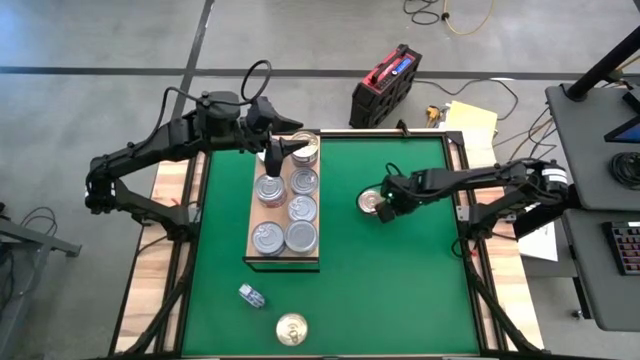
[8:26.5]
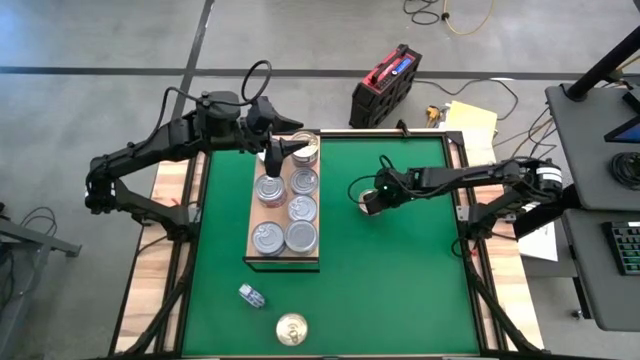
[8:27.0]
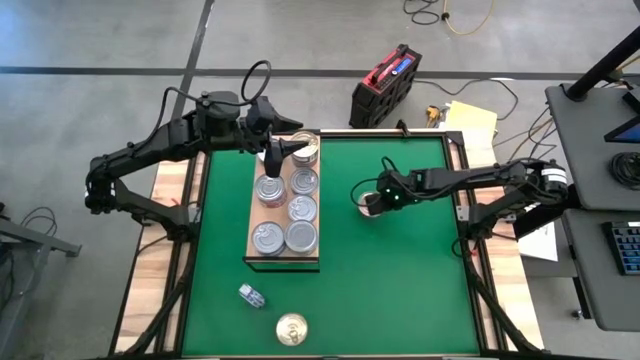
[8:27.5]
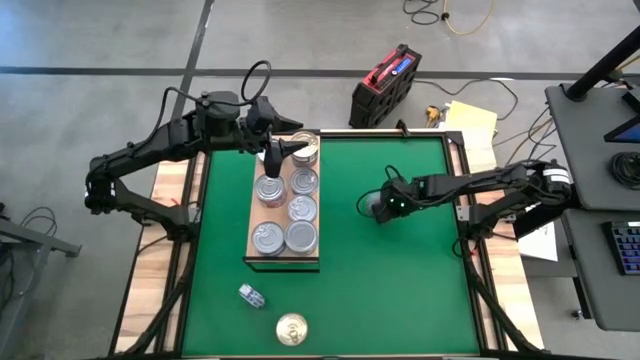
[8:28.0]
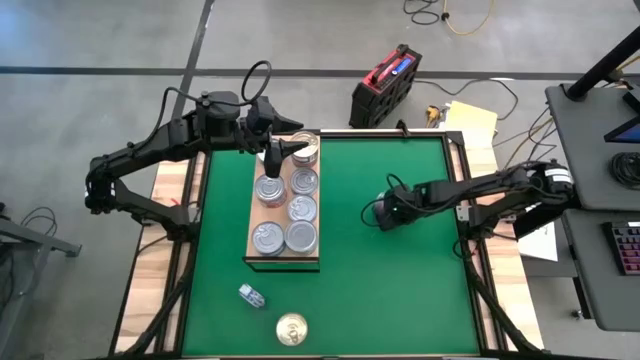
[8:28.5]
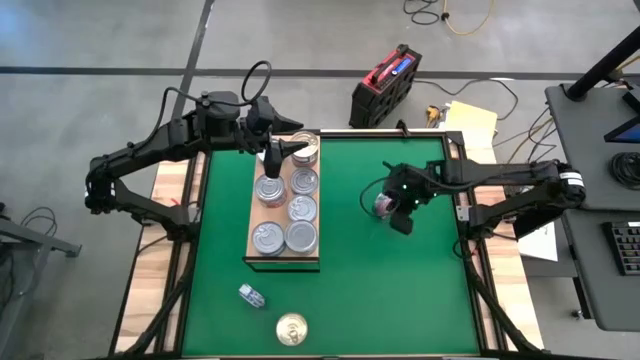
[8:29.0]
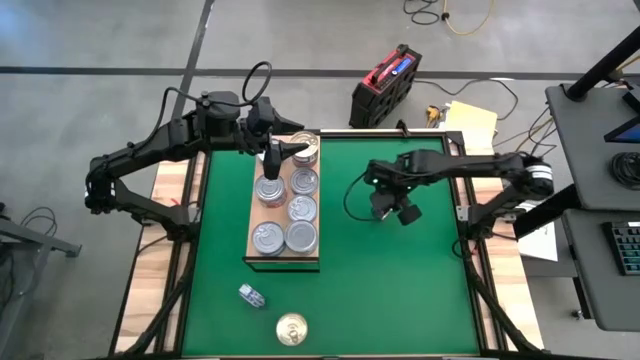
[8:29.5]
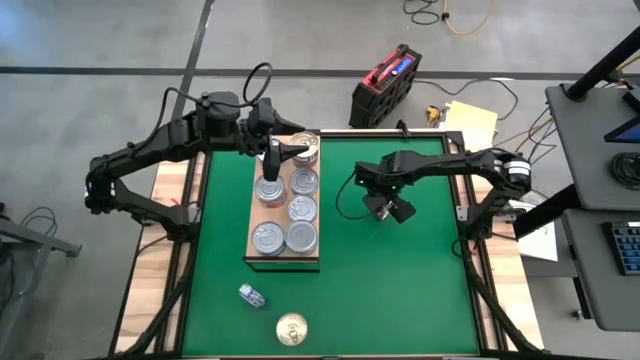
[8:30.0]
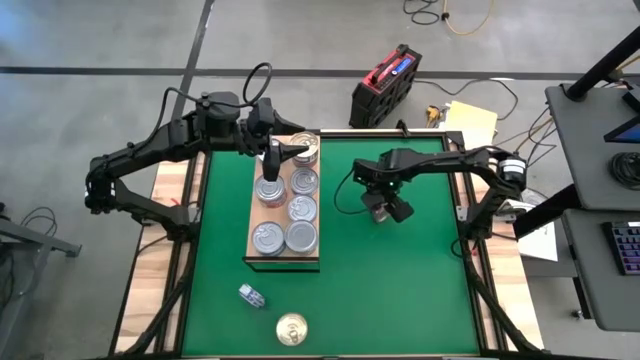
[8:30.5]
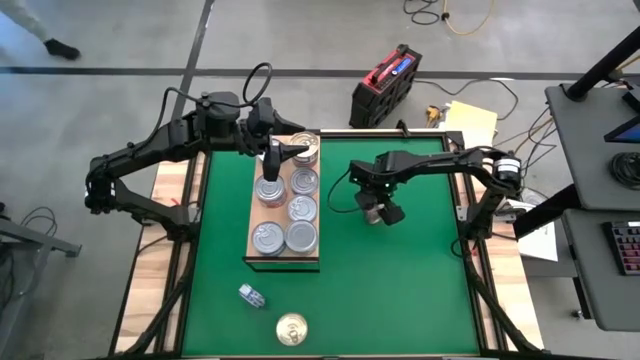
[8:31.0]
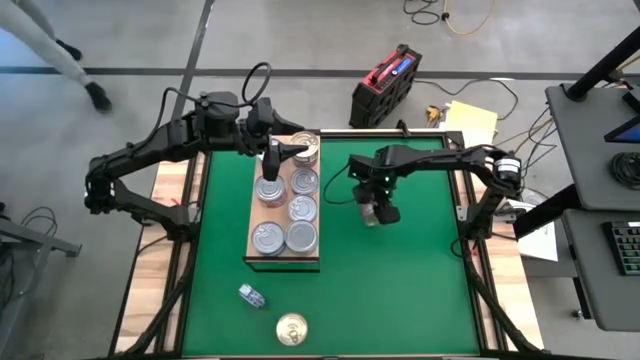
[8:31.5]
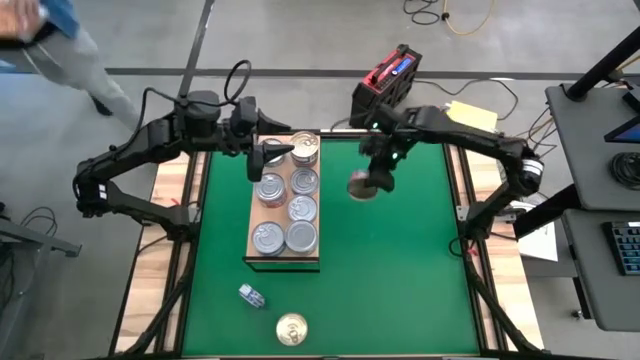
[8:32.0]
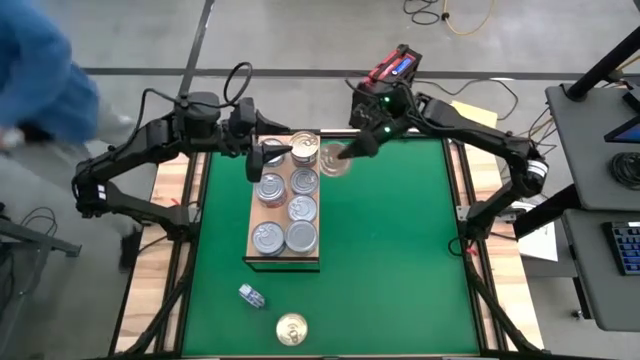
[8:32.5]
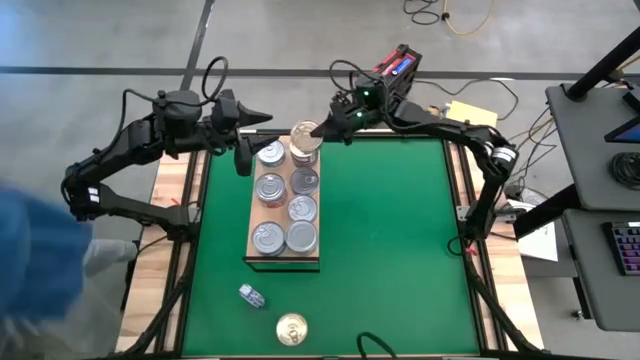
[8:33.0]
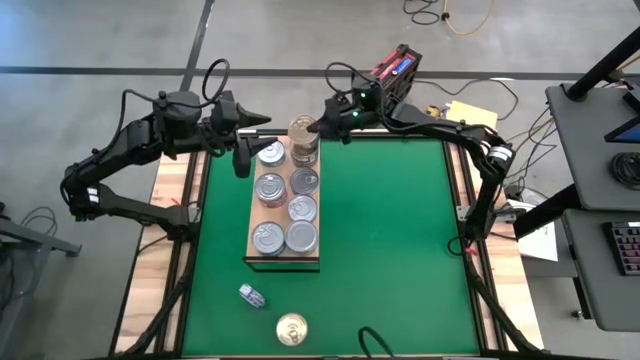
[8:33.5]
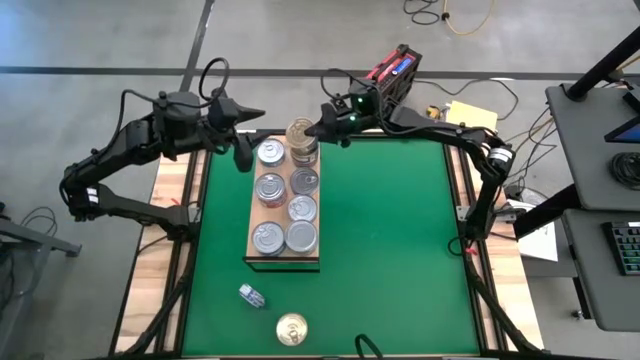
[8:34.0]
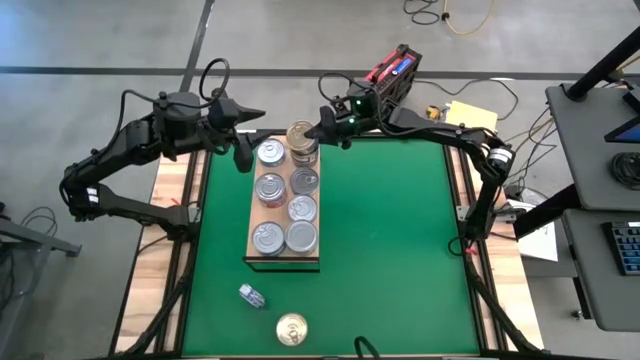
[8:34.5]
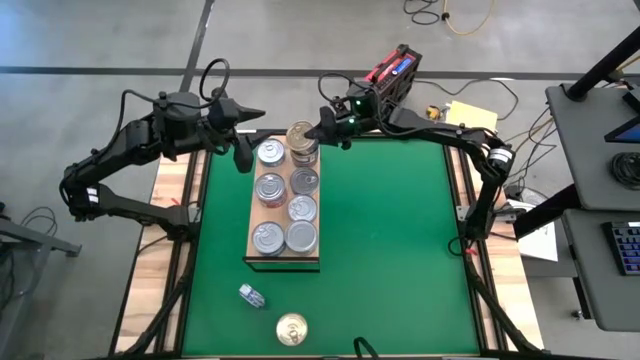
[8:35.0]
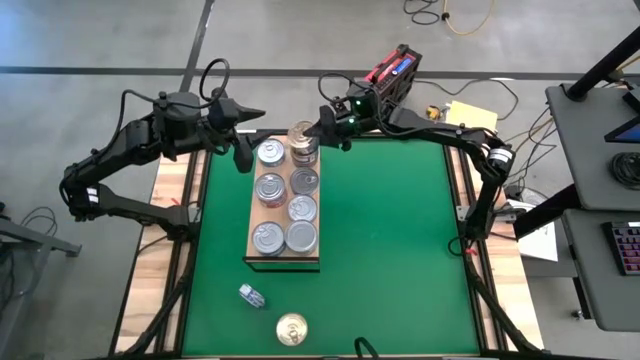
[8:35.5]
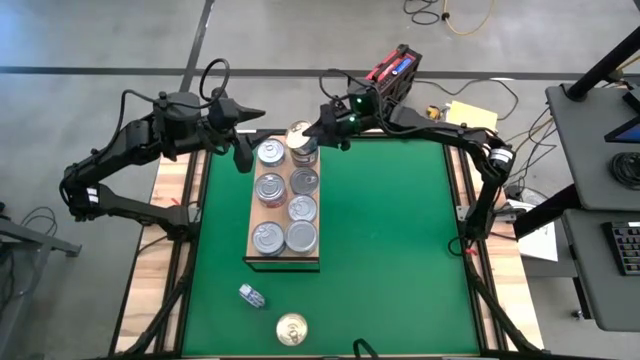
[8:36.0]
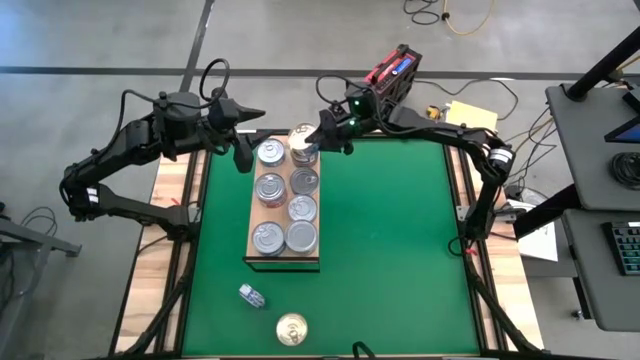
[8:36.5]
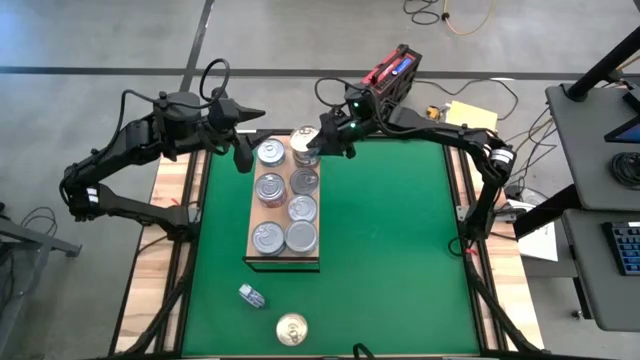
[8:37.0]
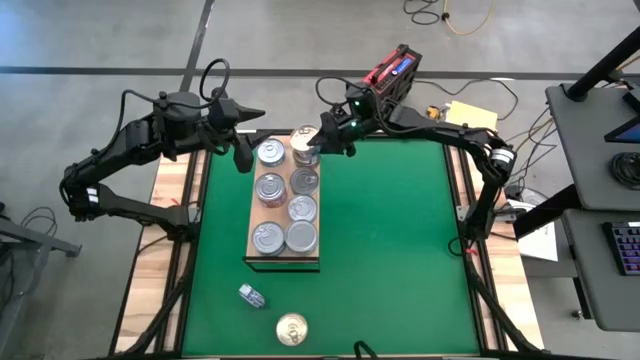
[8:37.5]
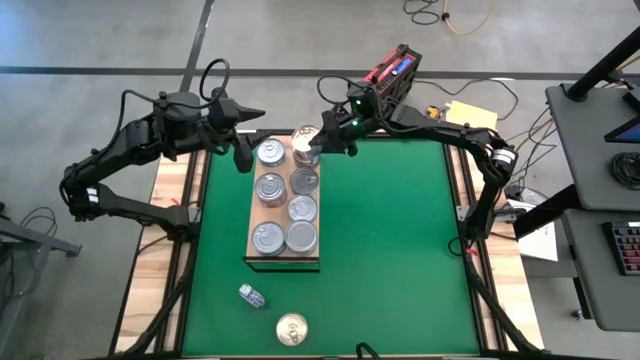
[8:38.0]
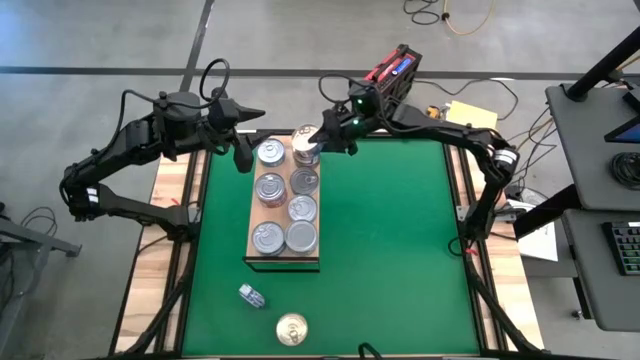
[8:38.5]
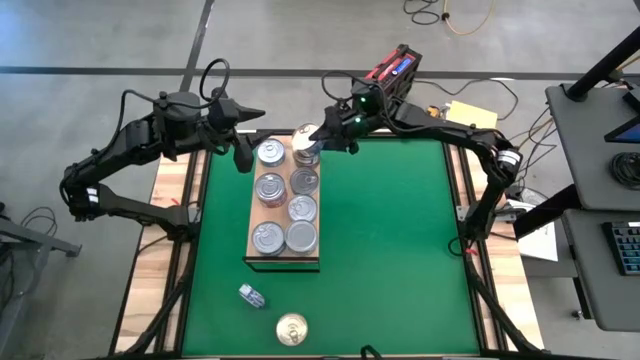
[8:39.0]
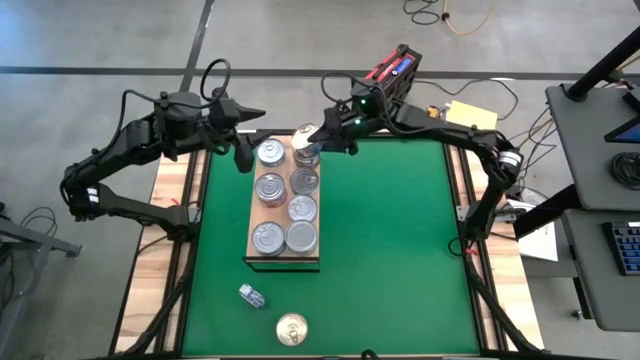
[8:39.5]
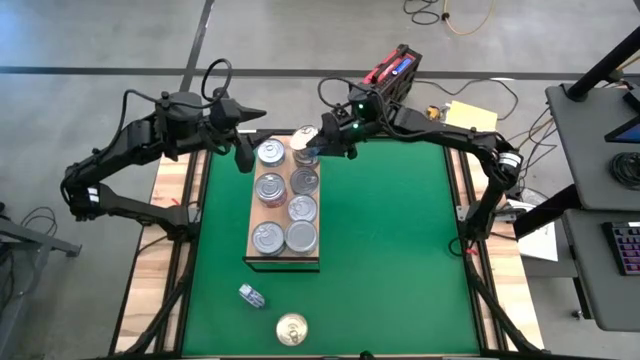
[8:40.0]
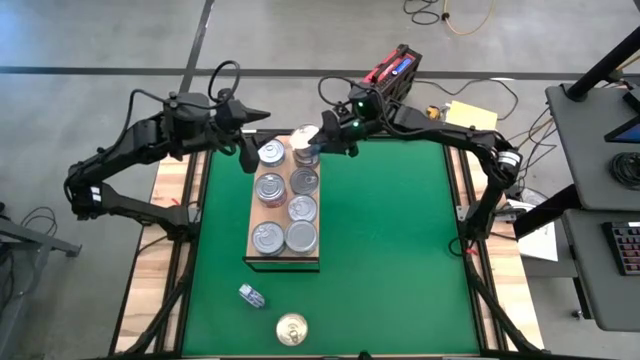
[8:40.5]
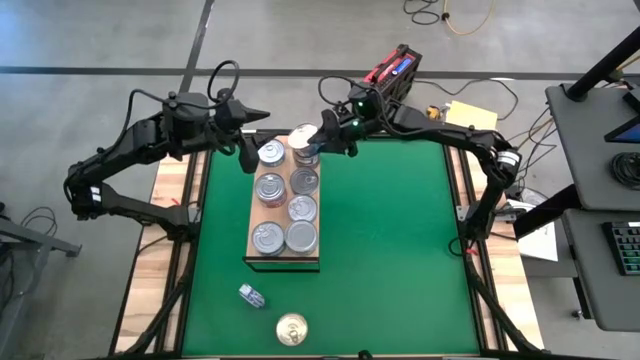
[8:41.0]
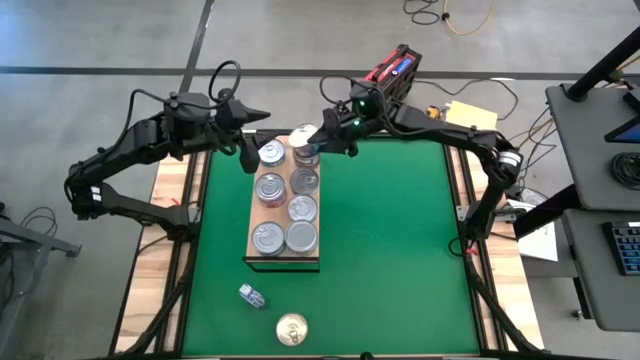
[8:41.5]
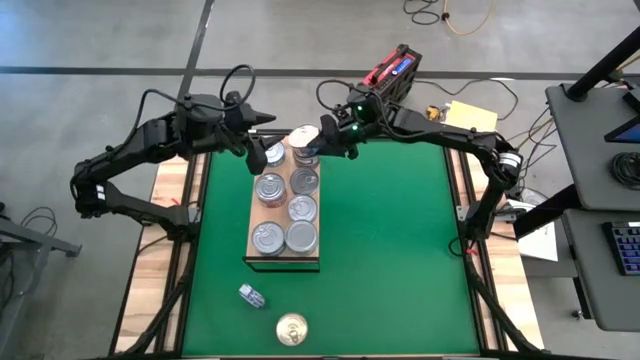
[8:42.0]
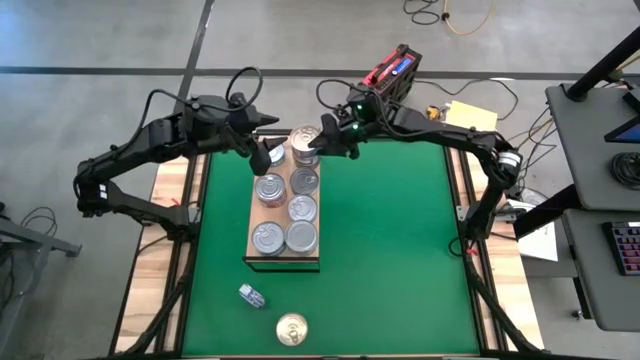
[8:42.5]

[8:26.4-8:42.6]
Task: Stack canned seafood by type on shelf
Stack the blue and pink tuna can on top of the blue and pink tuna cans on the shelf

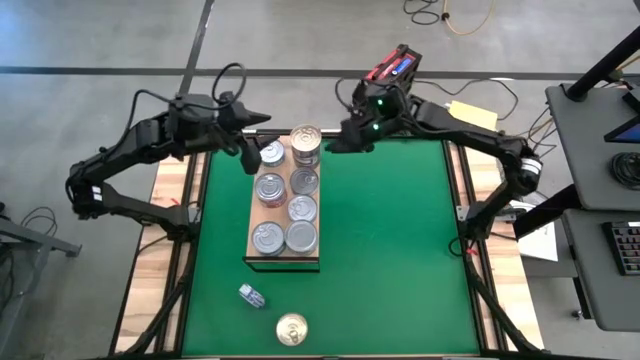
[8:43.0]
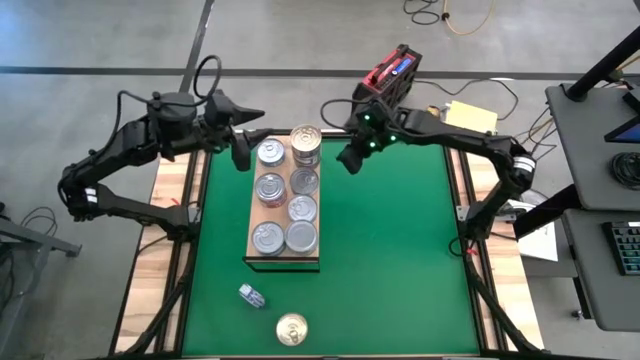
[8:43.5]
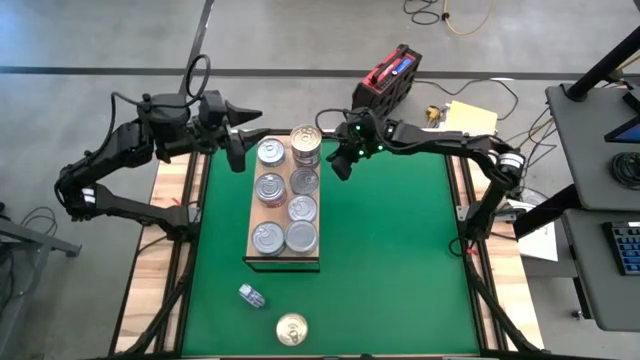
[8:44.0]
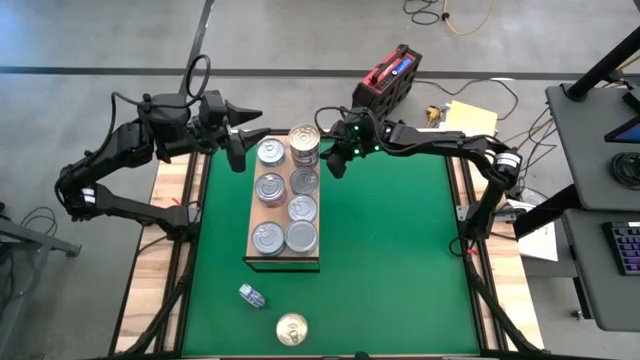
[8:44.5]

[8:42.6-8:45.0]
Adjust the stacked blue and pink tuna cans on the shelf

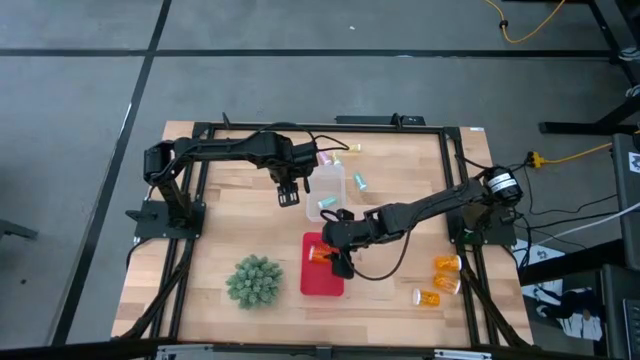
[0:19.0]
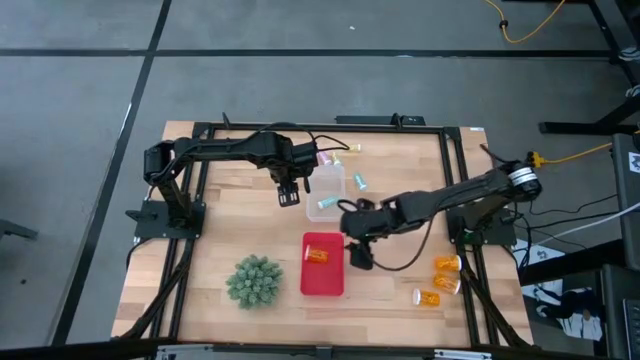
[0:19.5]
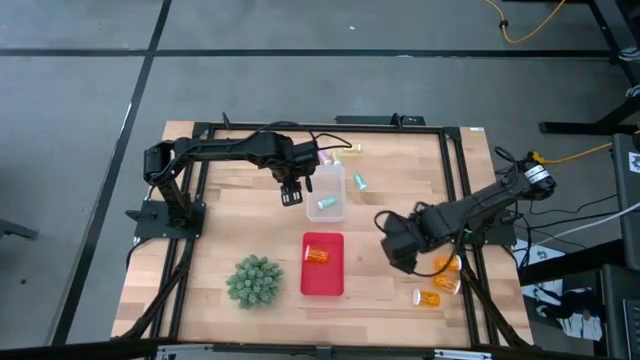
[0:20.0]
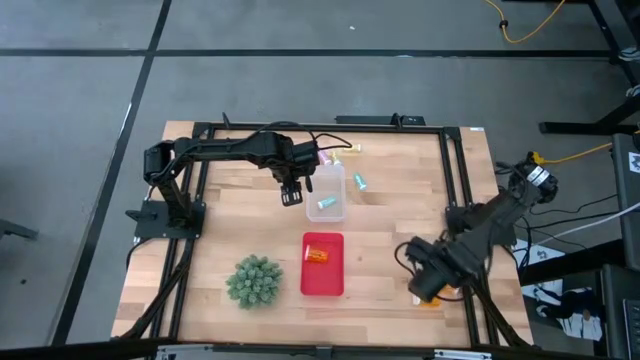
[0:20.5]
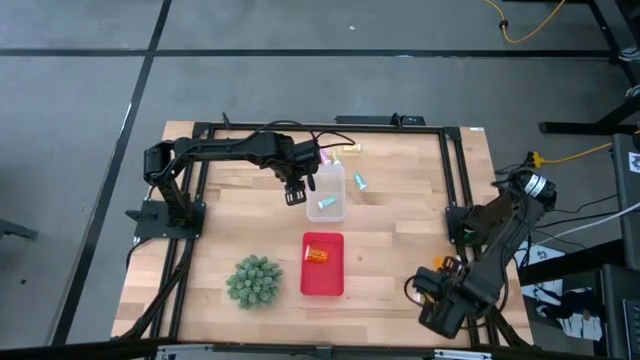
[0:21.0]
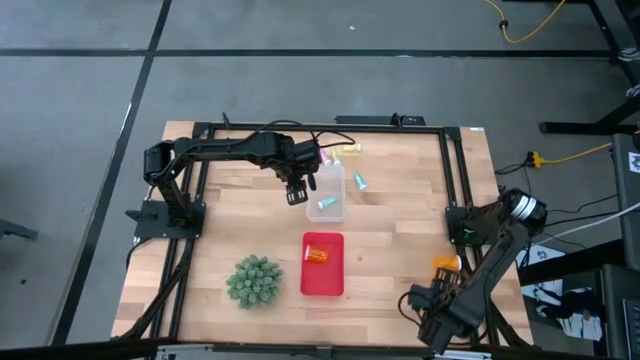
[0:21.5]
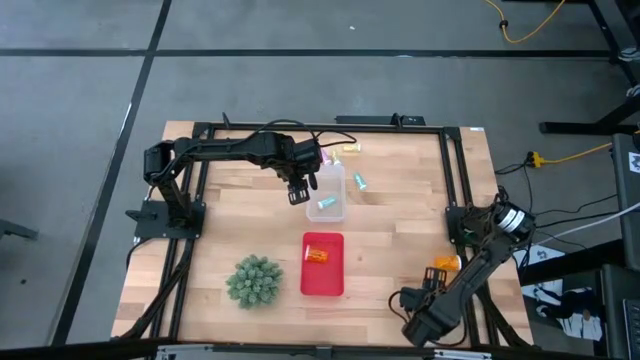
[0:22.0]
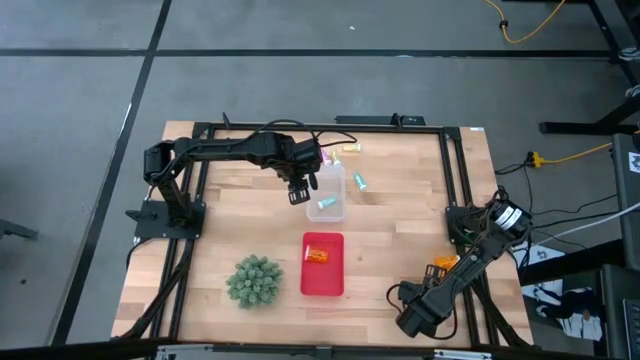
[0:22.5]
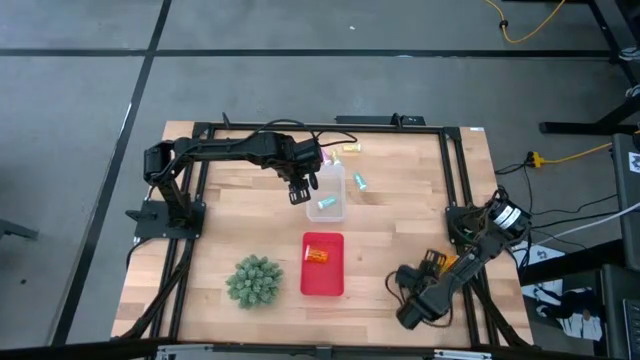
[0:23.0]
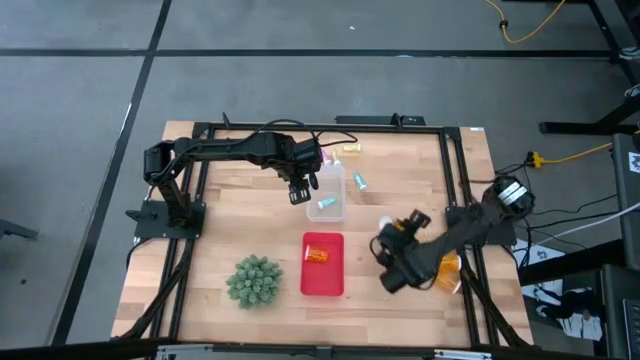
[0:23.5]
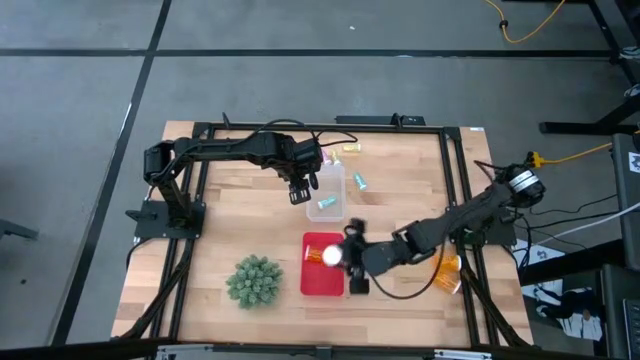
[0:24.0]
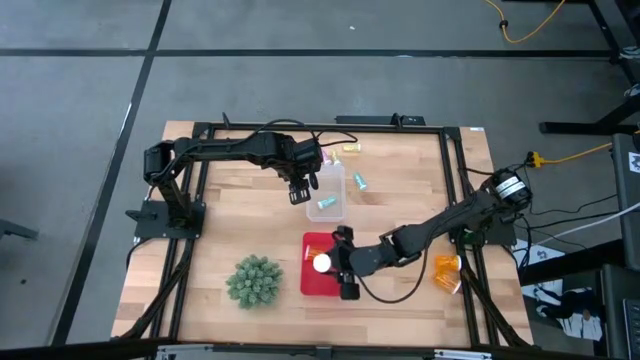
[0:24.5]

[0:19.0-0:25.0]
Task: Pick and place medicine bottles into bin by pill shape (circle, oval)
Put the bottom big orange pill bottle into the red bin
